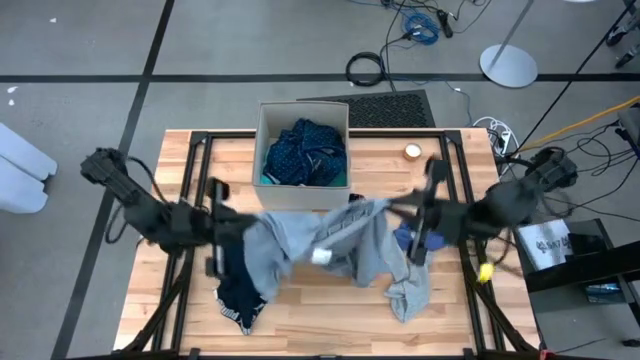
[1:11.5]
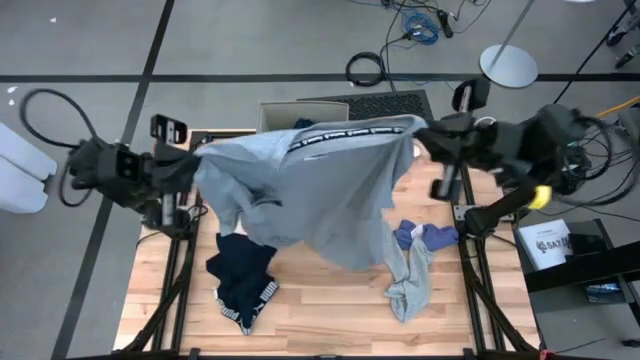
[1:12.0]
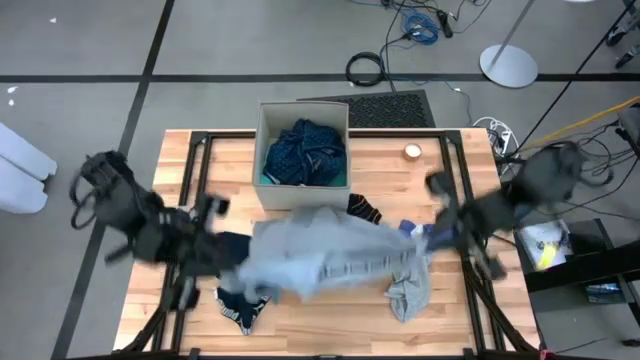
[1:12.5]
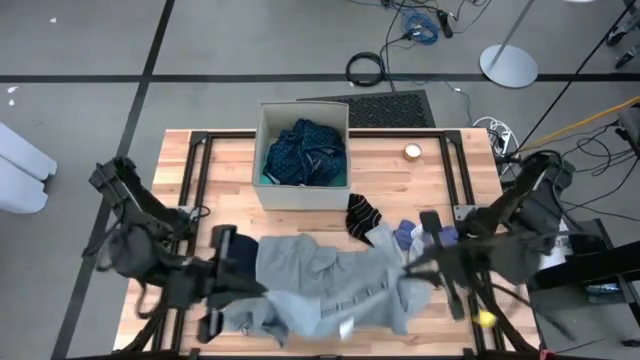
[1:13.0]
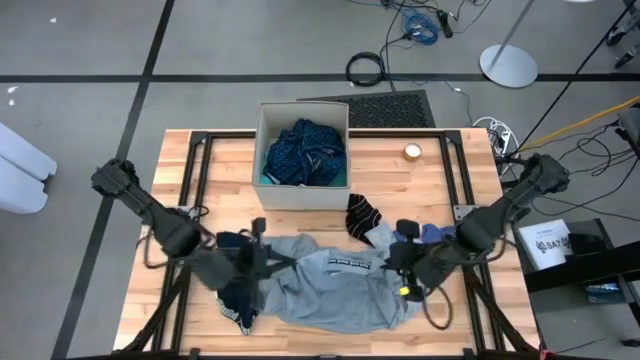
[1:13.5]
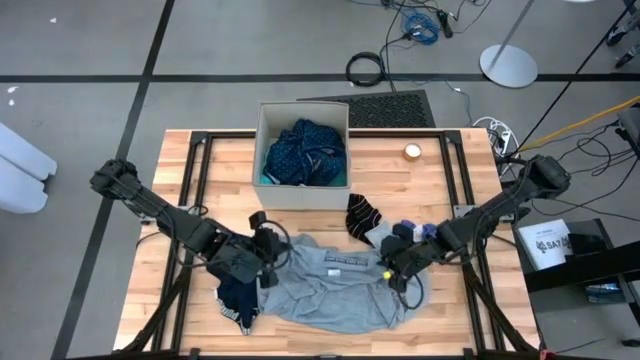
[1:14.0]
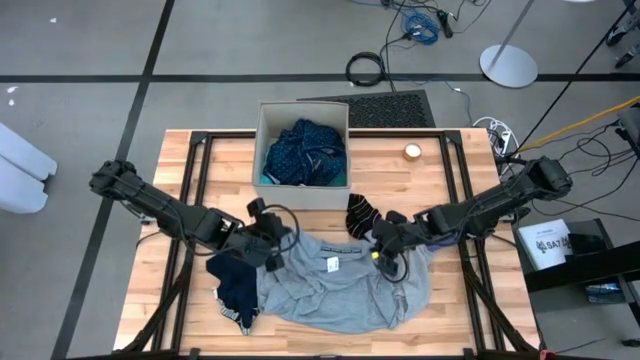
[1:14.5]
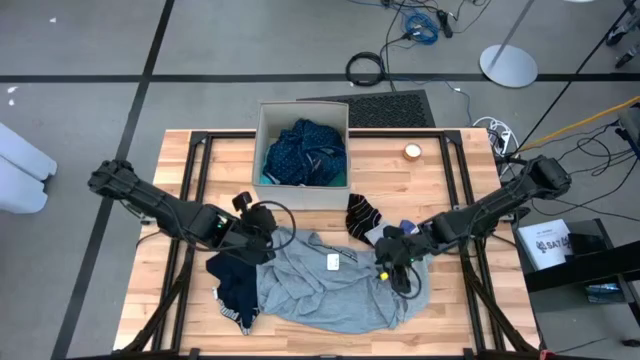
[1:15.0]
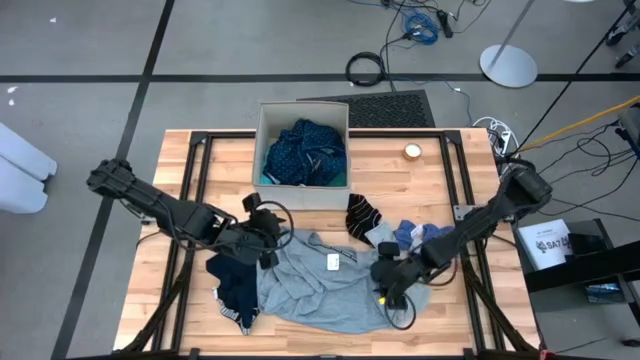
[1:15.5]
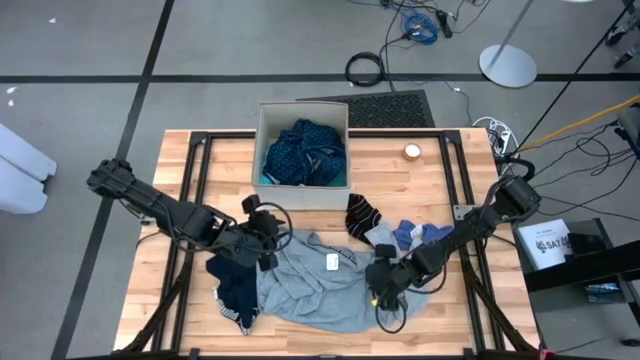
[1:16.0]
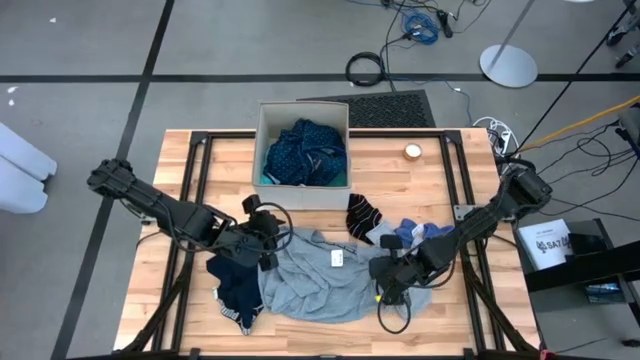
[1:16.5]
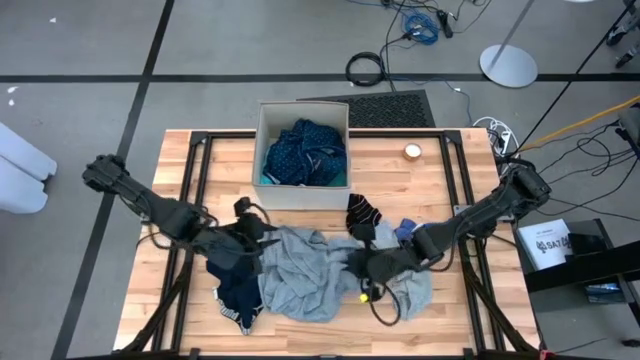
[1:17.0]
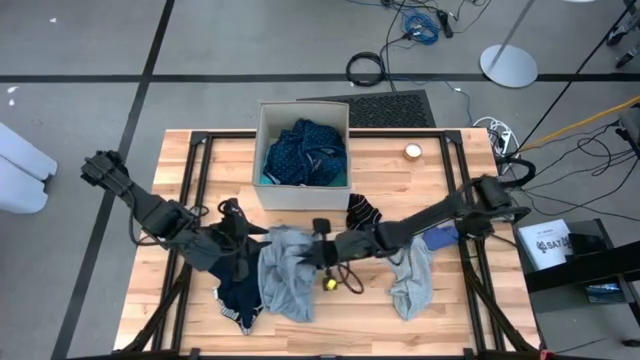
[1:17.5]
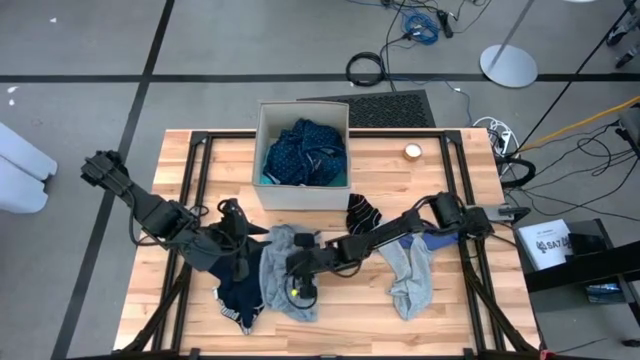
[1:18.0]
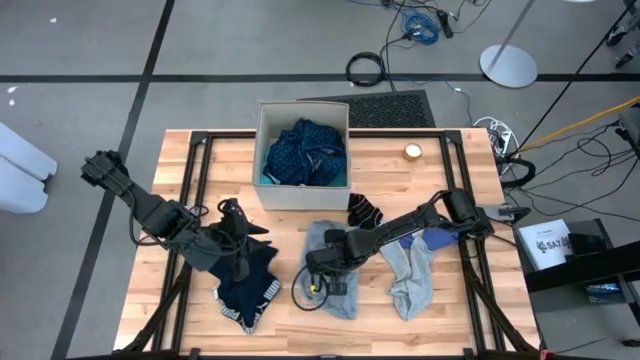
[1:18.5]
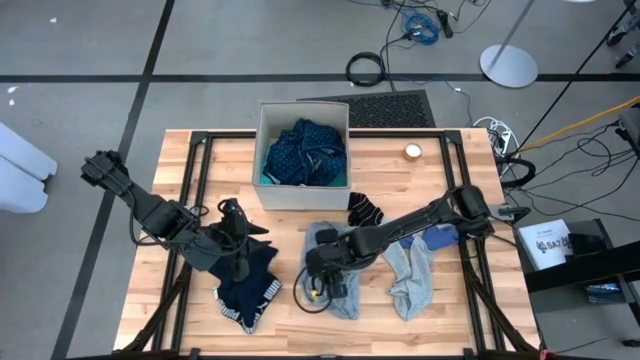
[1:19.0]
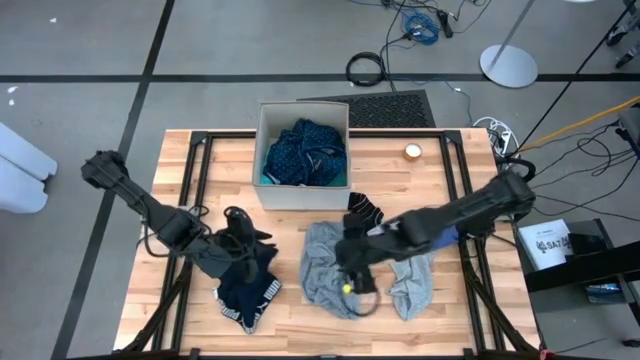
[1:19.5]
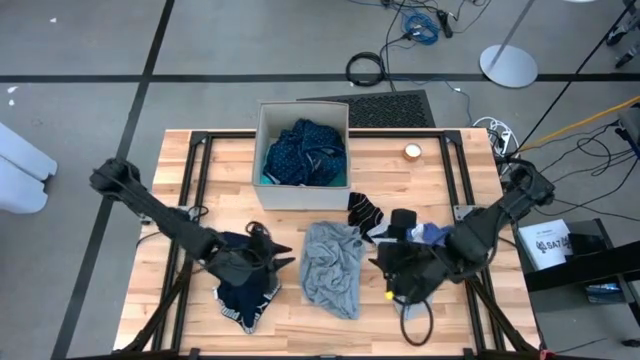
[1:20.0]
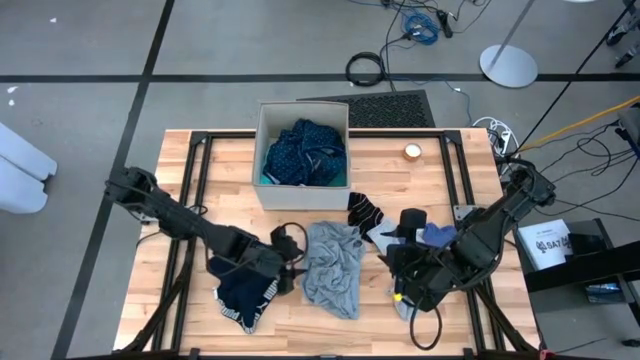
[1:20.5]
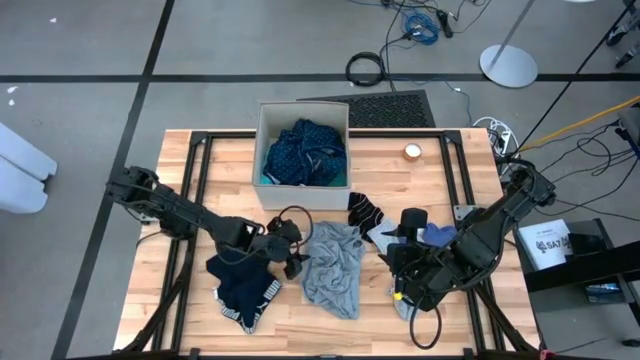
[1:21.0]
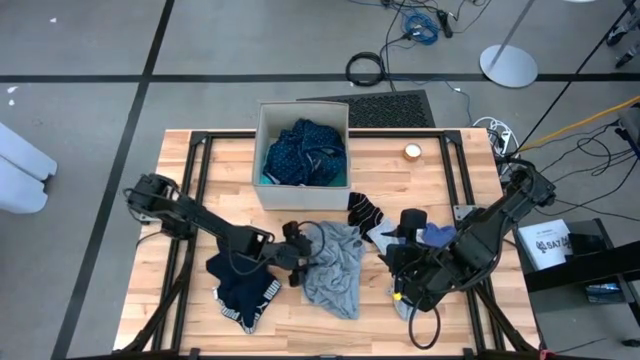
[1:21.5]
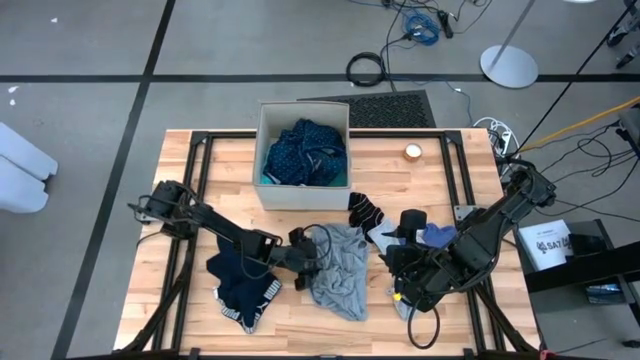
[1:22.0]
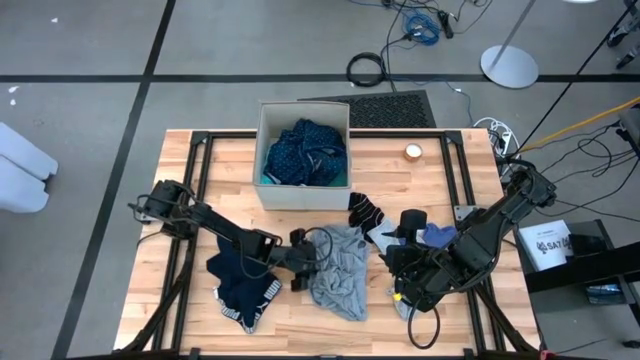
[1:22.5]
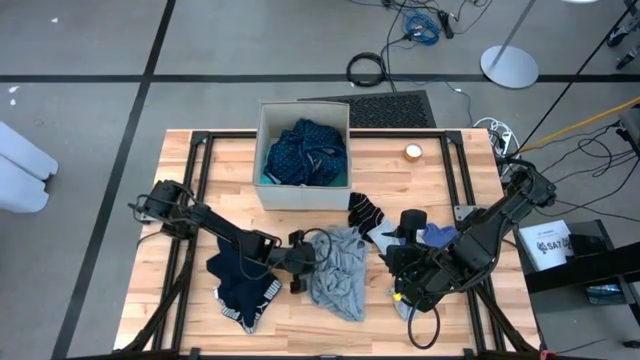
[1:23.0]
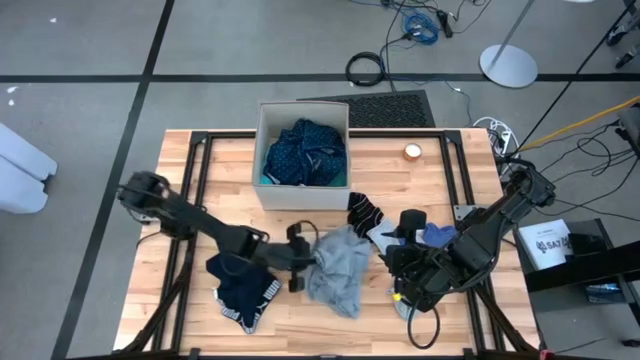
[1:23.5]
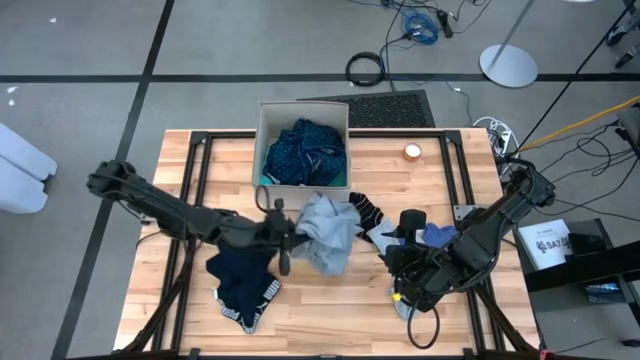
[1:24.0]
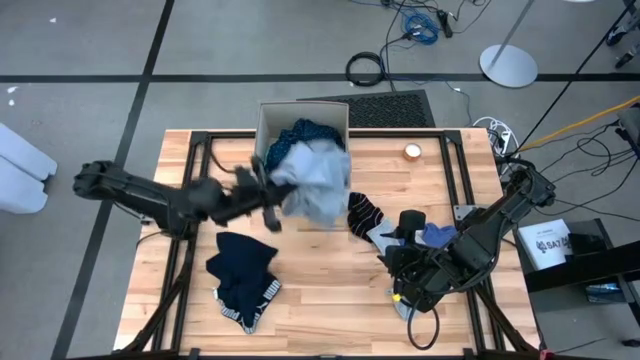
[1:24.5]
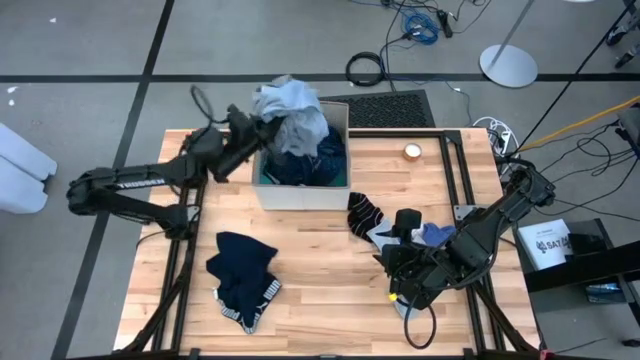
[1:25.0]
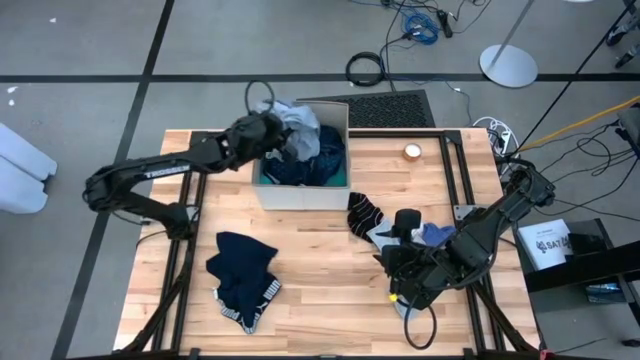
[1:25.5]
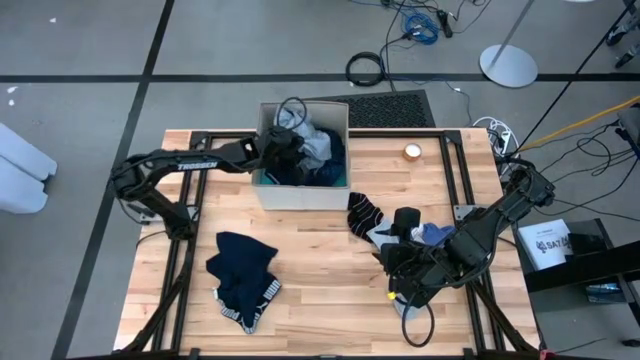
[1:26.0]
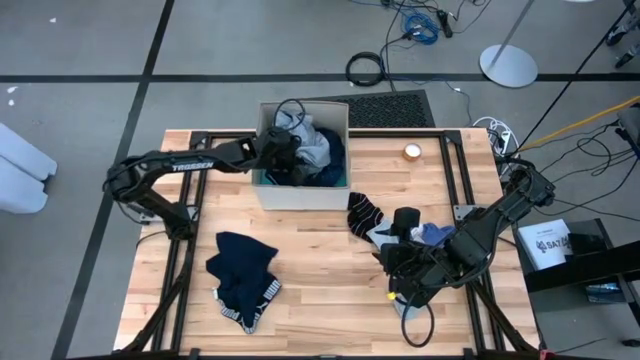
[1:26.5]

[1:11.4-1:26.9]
Task: Sort clothes
Put the gray shirt into the white laundry organizer

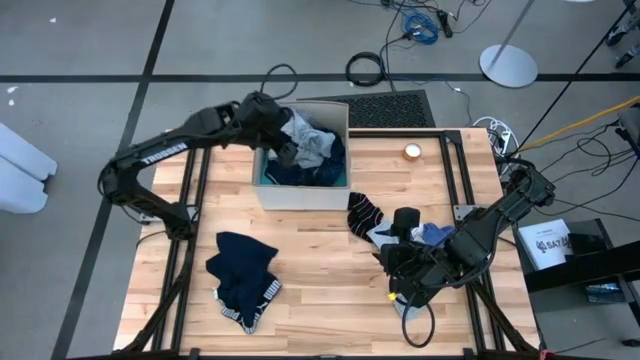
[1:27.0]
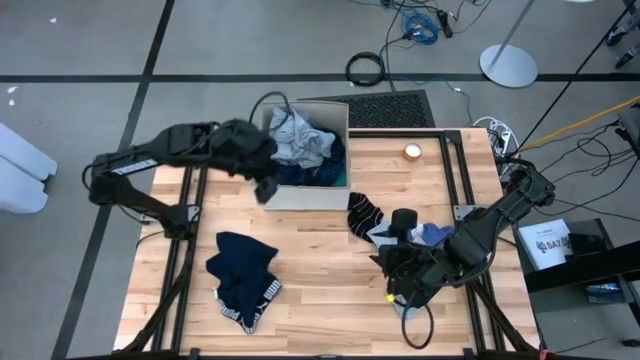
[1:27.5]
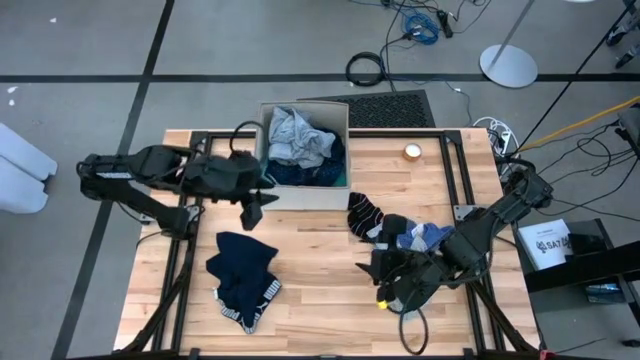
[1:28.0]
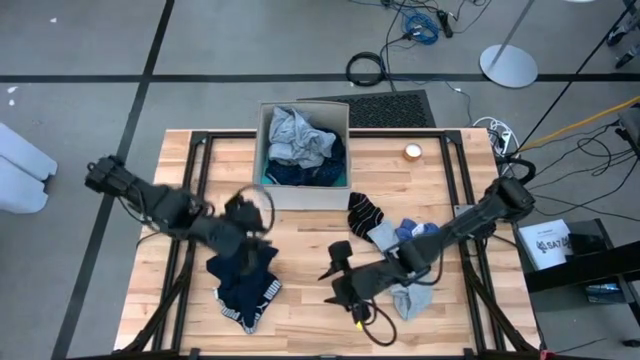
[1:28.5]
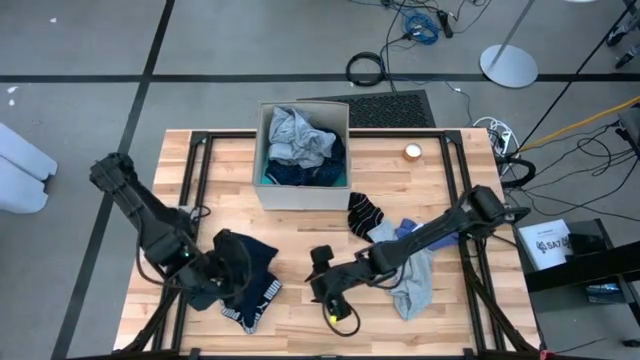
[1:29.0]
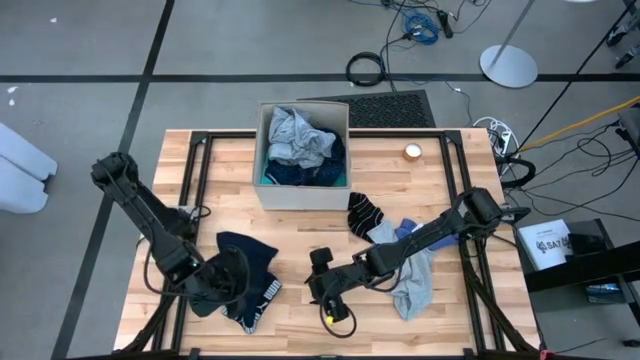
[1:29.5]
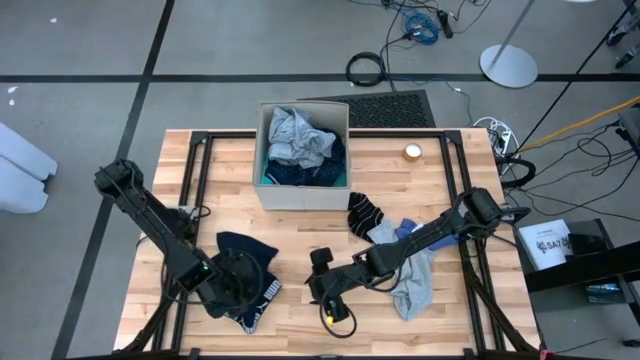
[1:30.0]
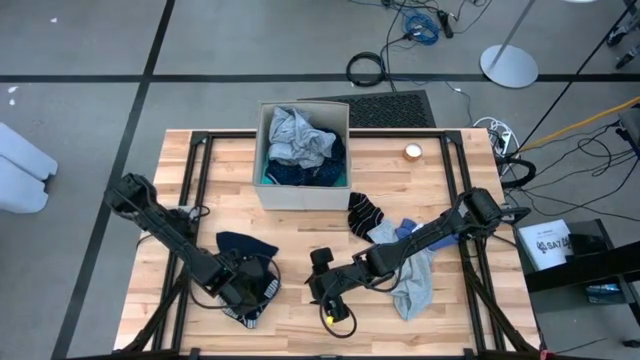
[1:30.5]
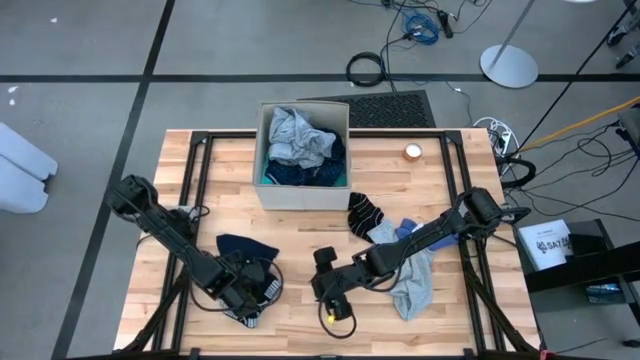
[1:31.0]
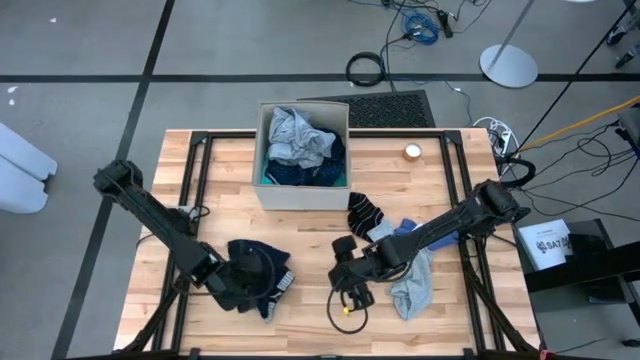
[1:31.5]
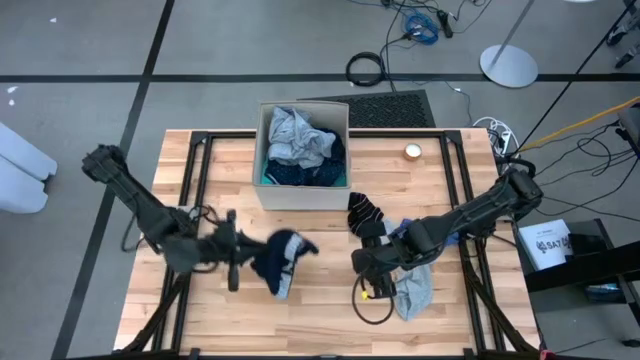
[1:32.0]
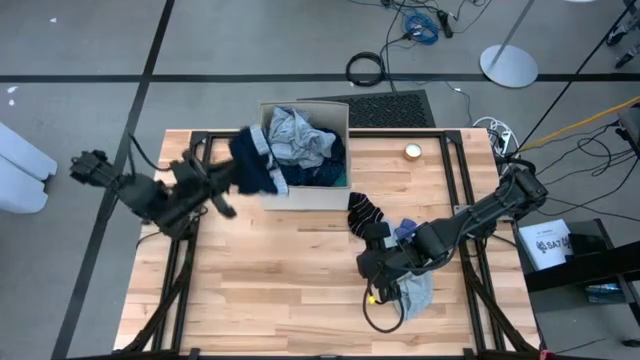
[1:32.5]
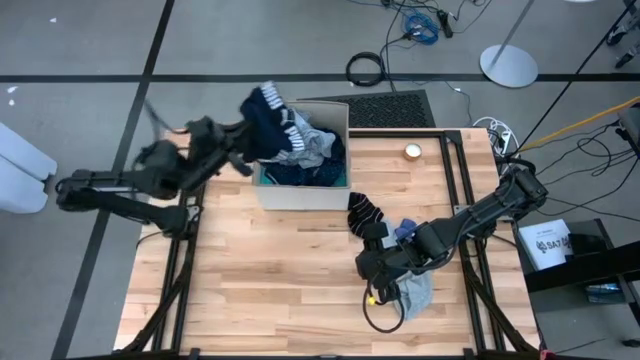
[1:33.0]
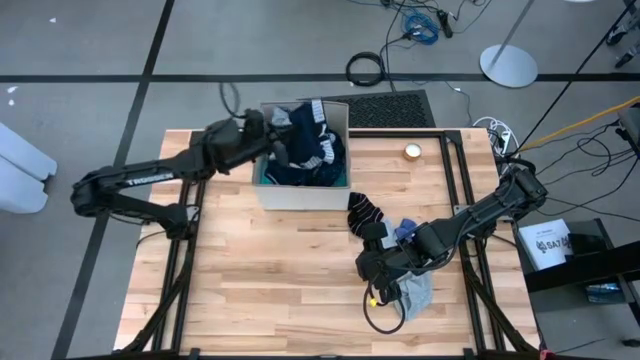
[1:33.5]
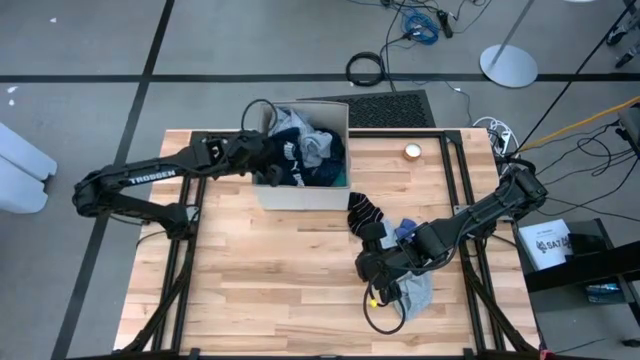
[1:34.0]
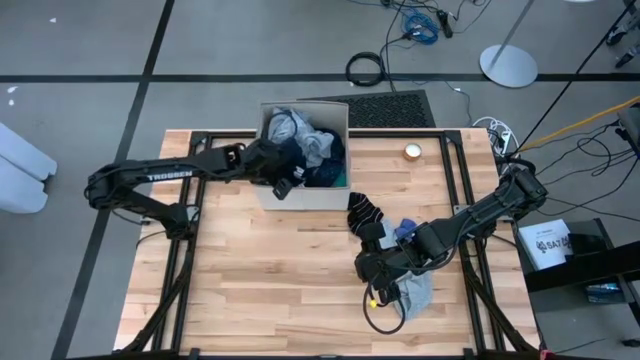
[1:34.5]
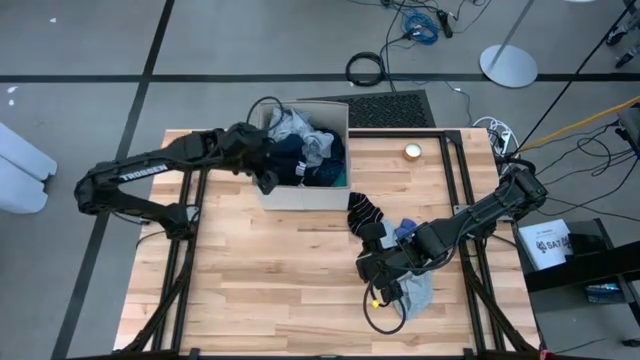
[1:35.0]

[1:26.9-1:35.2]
Put the blue underwear into the white laundry organizer
